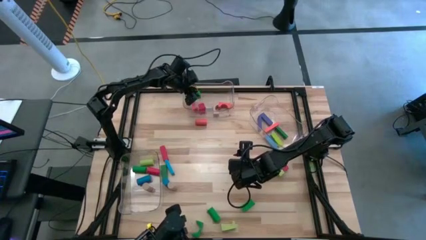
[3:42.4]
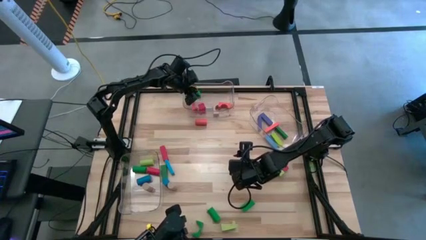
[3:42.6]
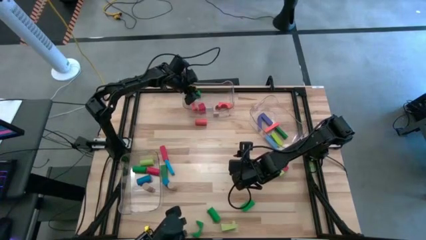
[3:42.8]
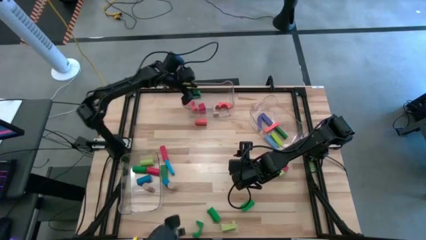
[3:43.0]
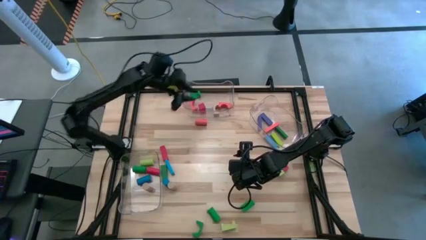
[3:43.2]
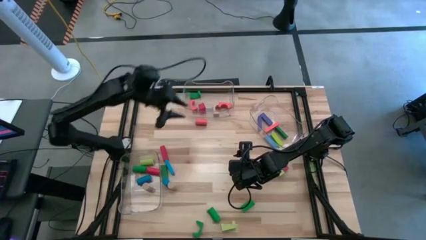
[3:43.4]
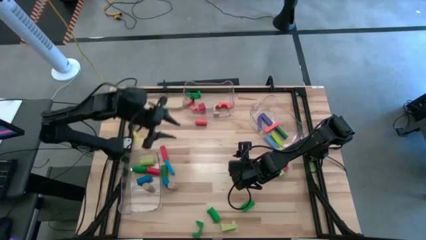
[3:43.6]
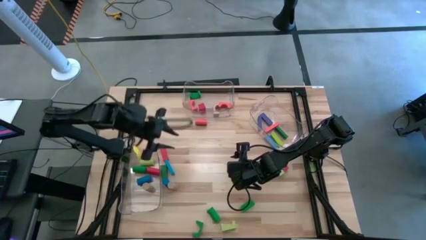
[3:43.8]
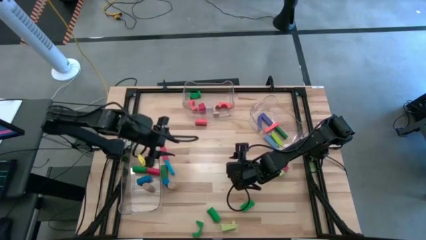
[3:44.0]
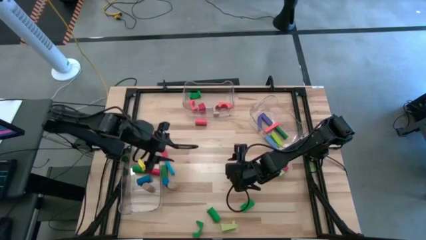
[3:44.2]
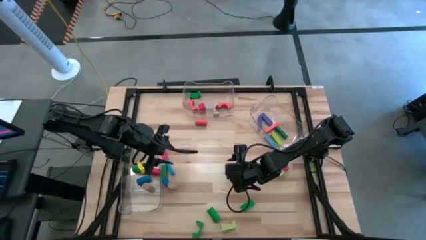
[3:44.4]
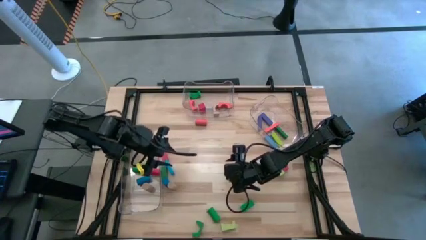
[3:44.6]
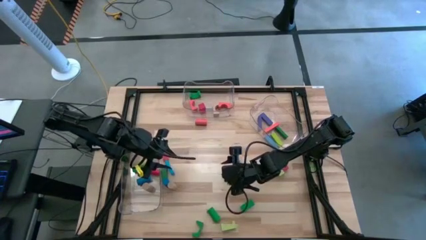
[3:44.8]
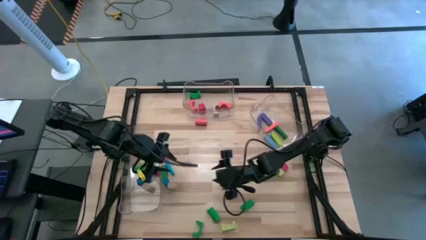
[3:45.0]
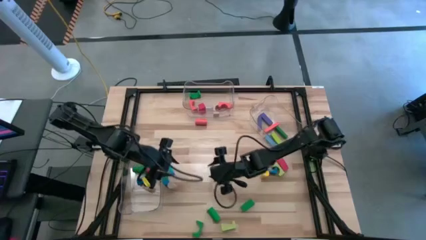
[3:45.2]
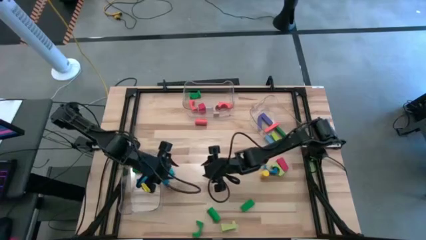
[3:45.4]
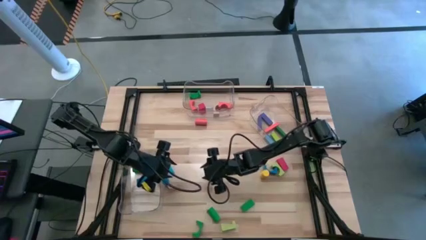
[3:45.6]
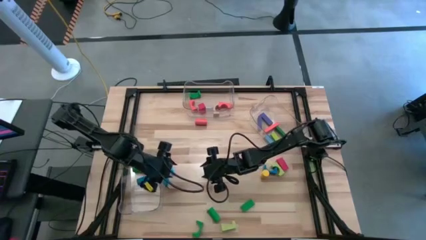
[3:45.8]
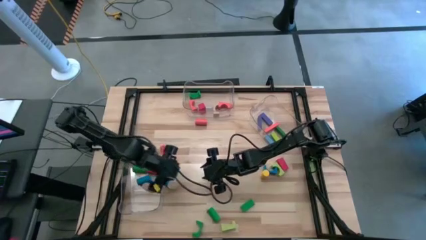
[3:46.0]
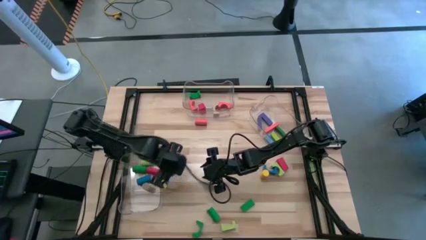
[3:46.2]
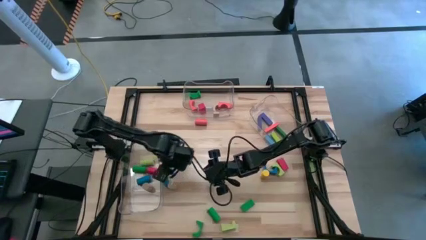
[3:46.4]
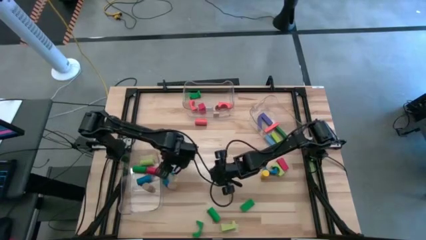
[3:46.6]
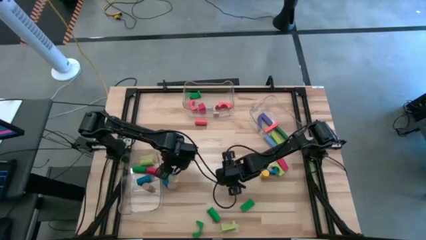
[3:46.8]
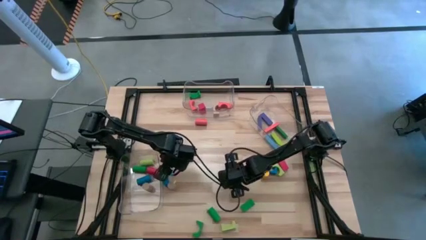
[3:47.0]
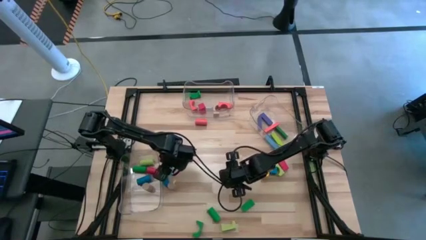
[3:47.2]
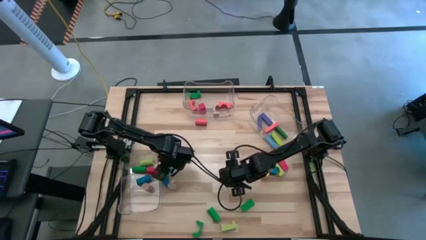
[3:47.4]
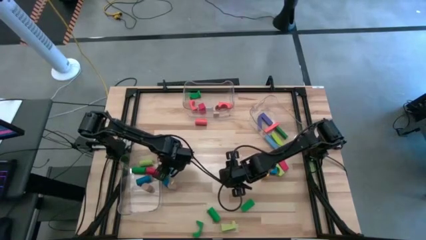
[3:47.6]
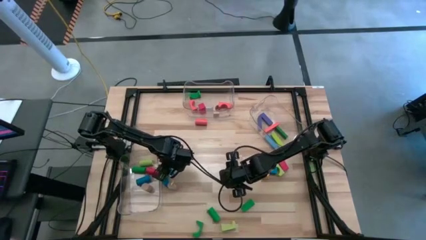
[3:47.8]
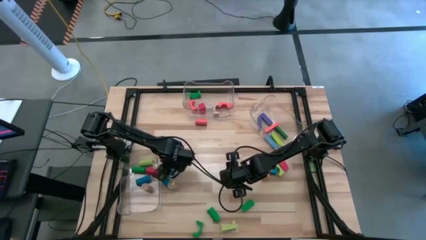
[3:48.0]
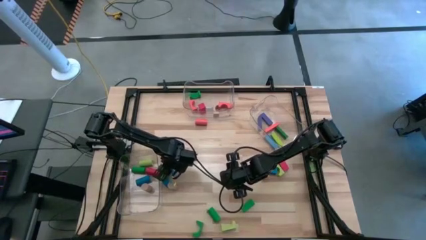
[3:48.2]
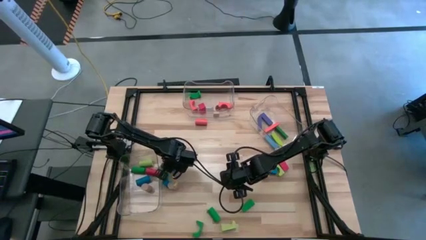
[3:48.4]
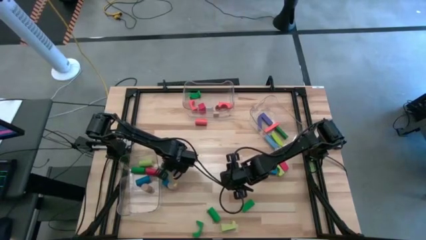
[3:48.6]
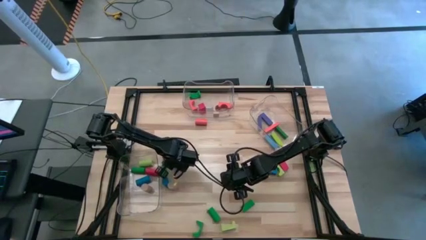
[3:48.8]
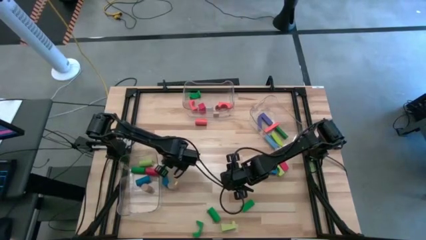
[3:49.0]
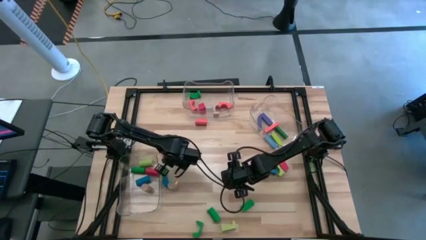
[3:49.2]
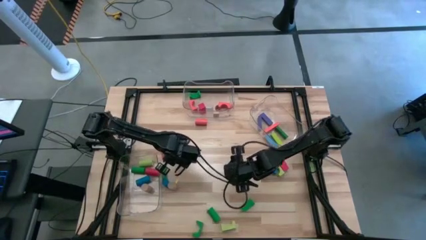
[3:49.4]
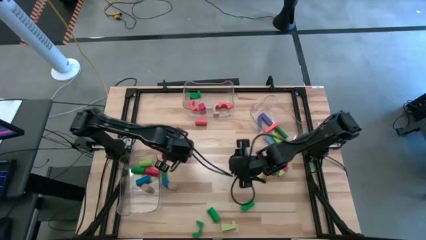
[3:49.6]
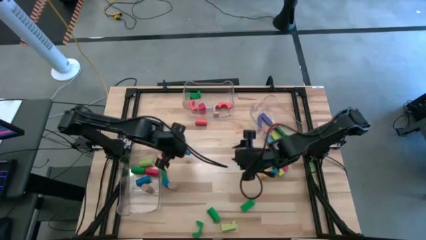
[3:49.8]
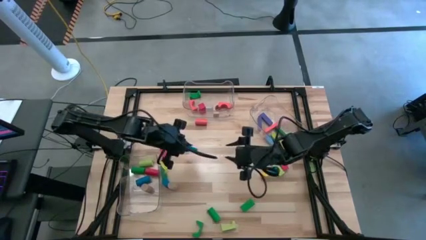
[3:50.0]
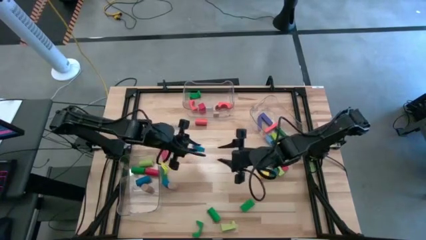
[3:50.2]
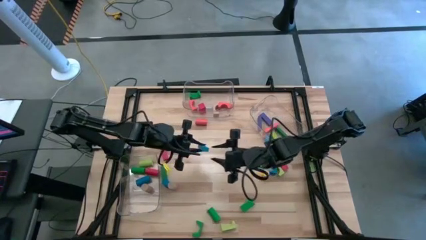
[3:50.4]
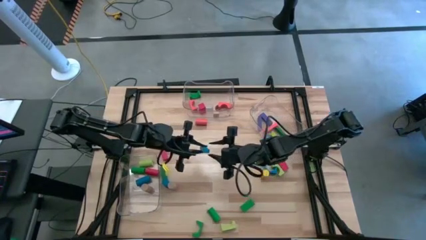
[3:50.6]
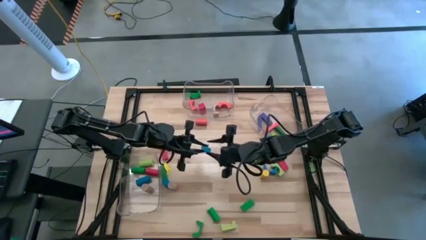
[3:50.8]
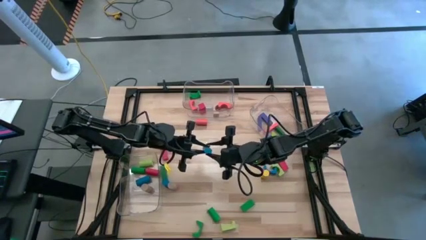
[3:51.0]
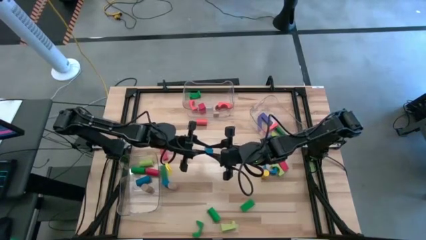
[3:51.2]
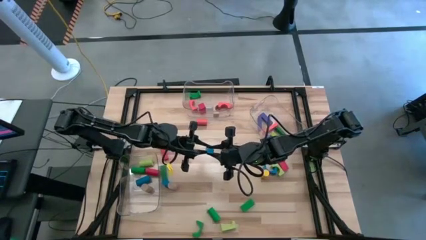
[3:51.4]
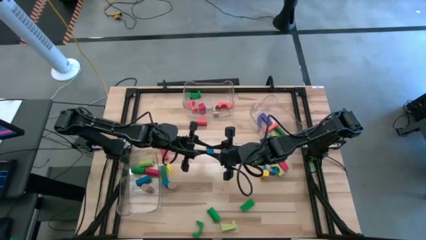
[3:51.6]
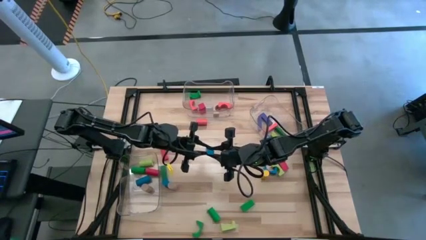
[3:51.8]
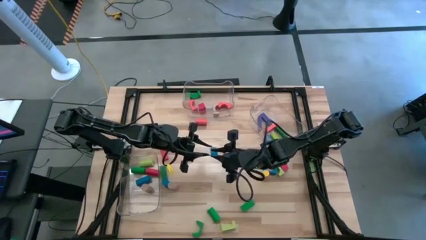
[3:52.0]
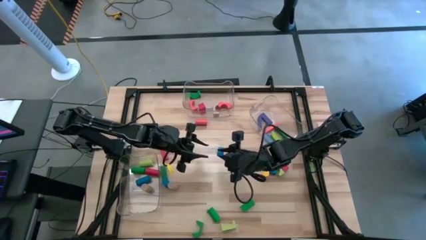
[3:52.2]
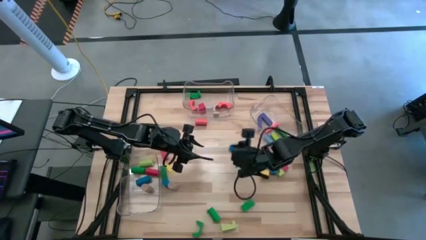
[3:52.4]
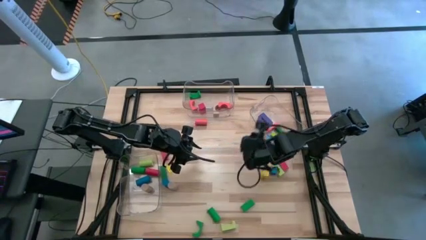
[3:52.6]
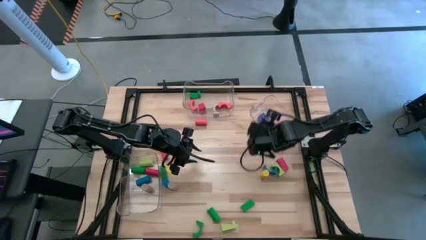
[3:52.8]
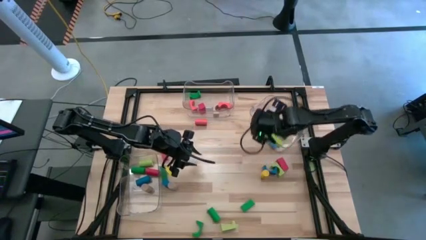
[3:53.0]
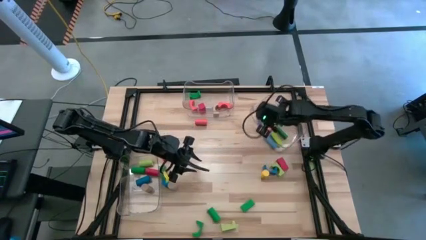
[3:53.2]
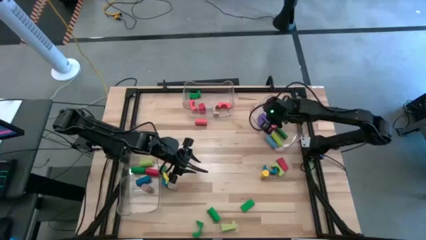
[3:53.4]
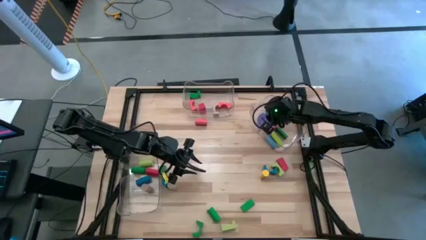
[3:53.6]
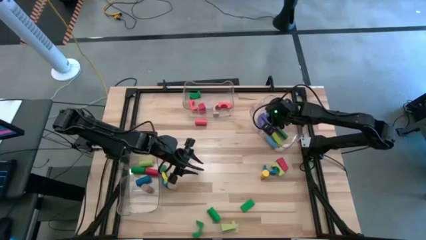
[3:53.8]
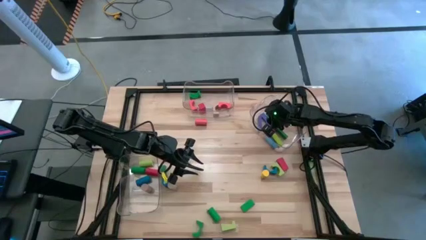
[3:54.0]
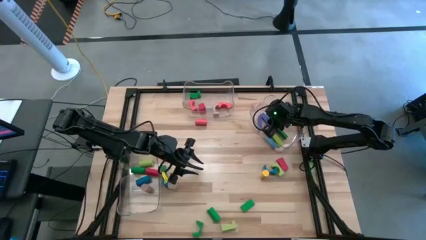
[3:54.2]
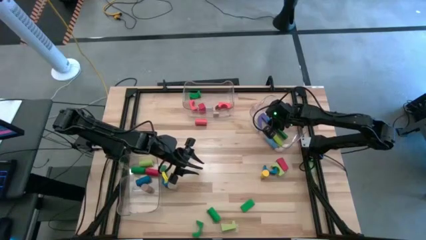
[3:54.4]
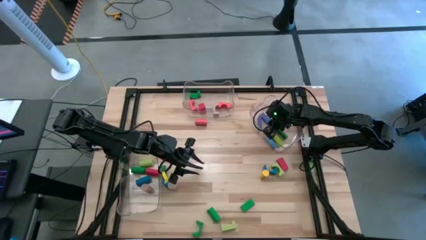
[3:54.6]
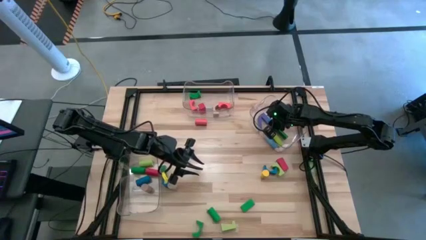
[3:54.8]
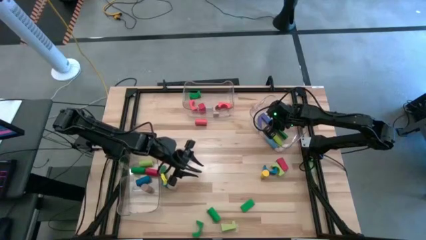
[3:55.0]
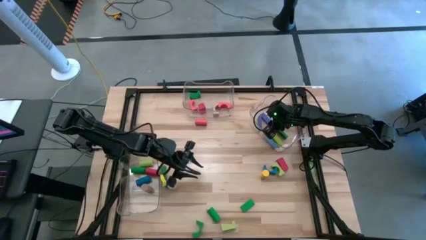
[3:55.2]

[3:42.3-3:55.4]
Task: Sort blocks by size
Put the light blue rectangular block into the right transparent bin
